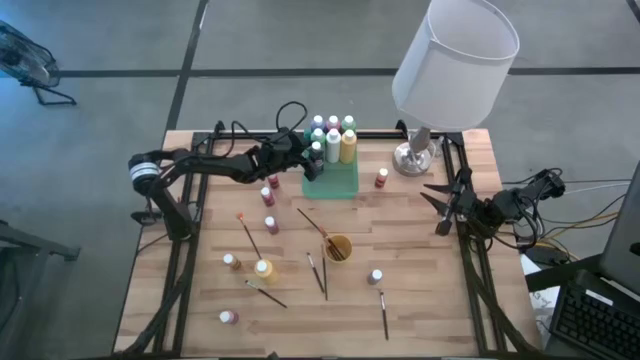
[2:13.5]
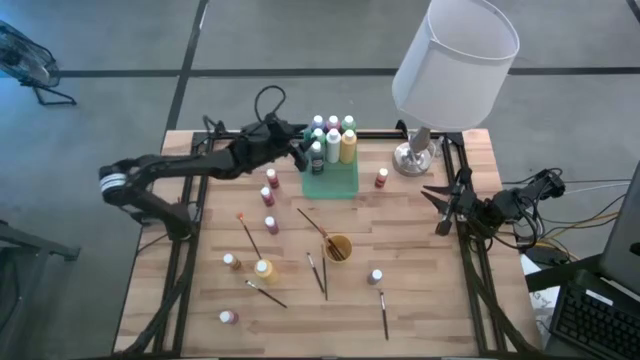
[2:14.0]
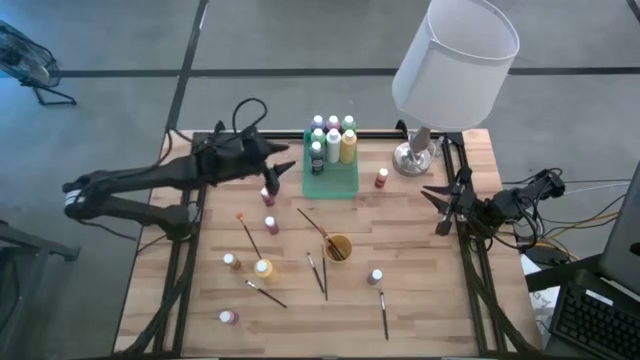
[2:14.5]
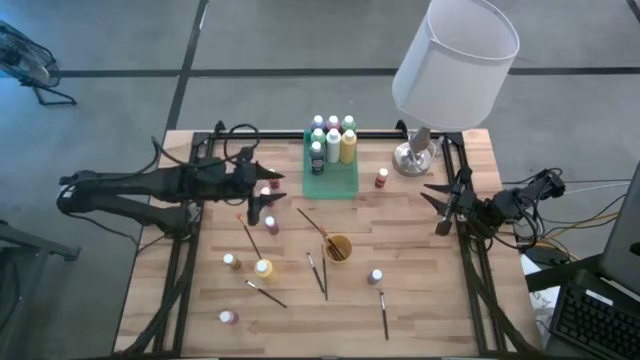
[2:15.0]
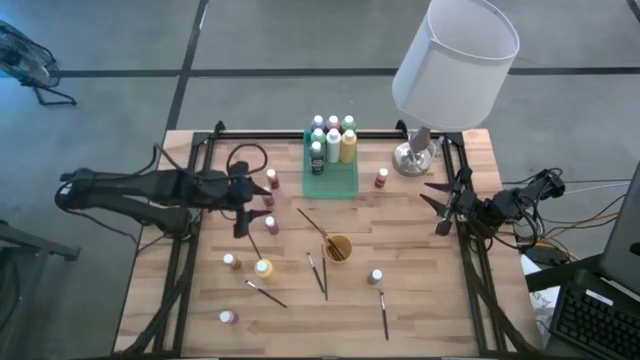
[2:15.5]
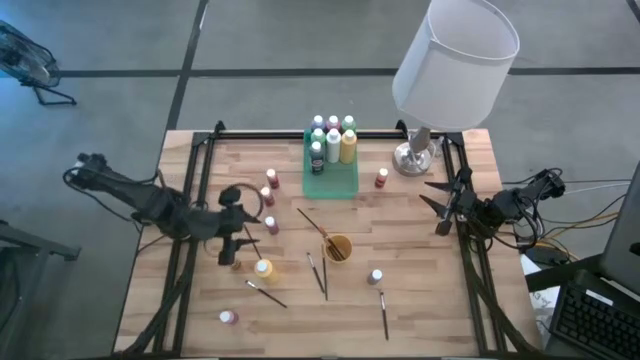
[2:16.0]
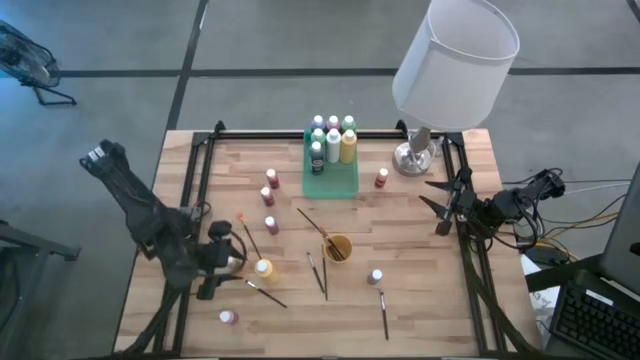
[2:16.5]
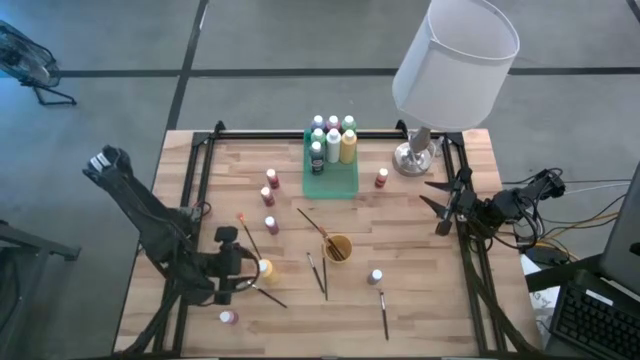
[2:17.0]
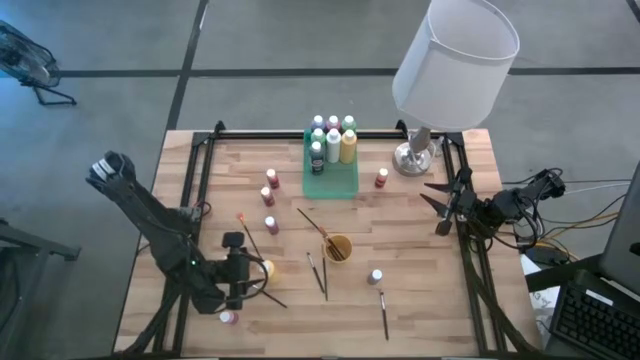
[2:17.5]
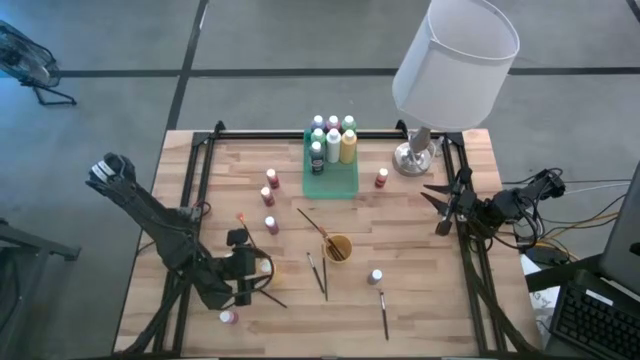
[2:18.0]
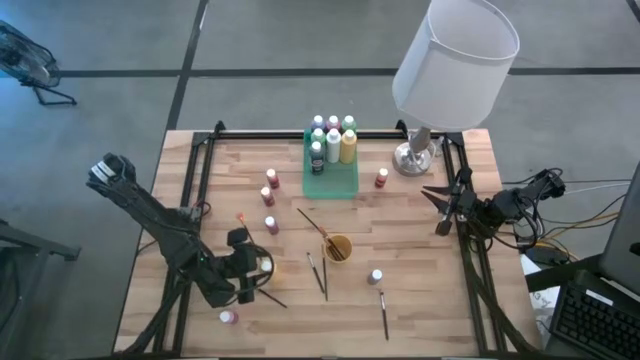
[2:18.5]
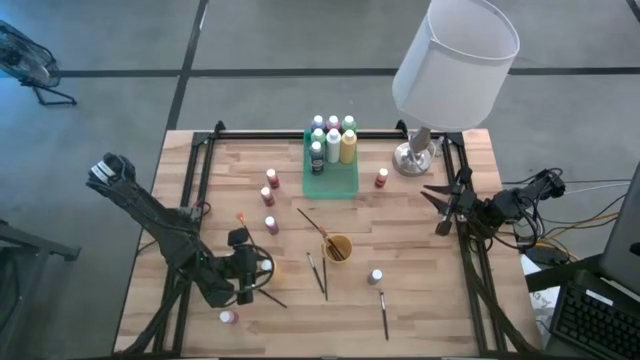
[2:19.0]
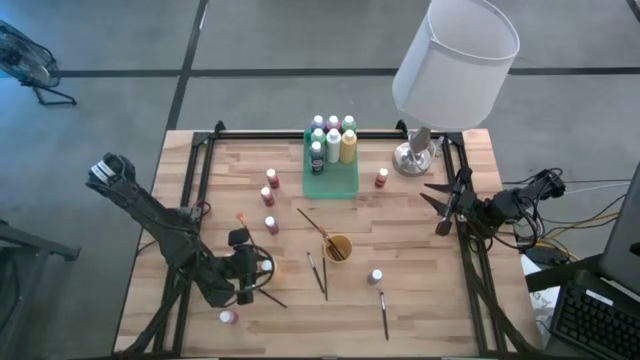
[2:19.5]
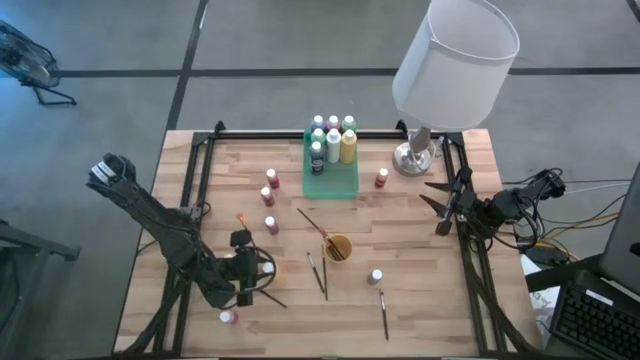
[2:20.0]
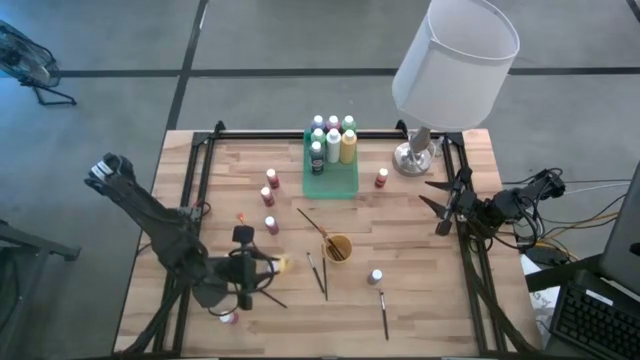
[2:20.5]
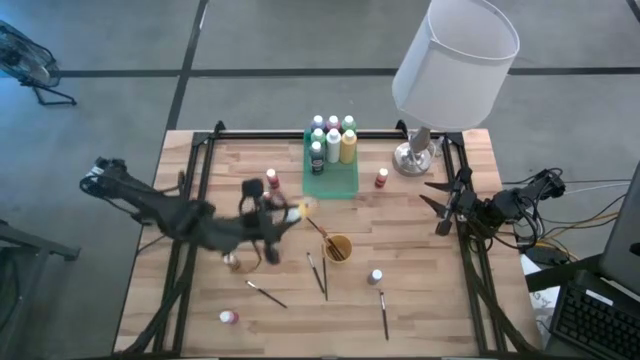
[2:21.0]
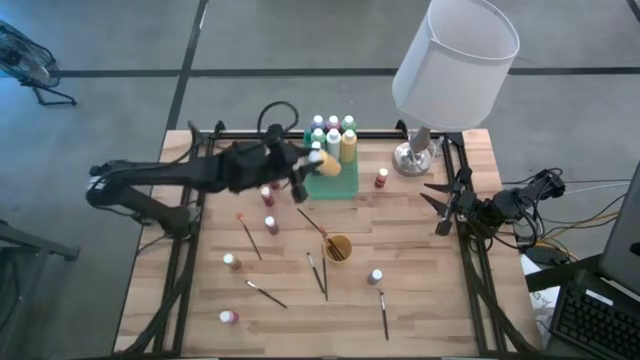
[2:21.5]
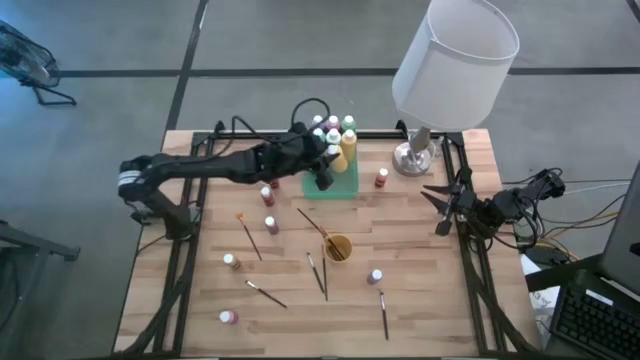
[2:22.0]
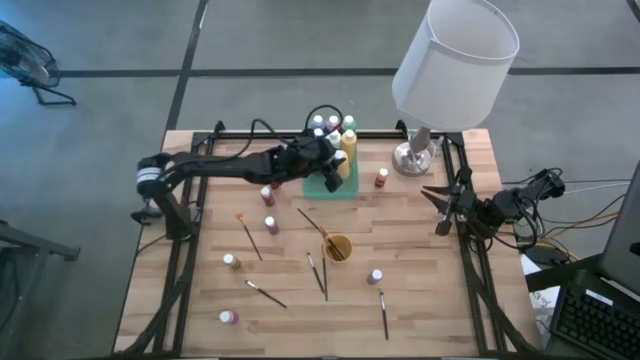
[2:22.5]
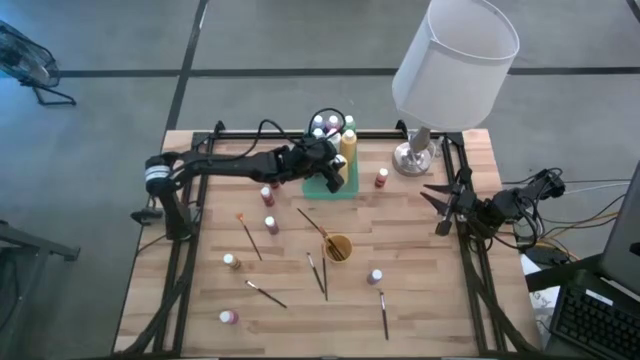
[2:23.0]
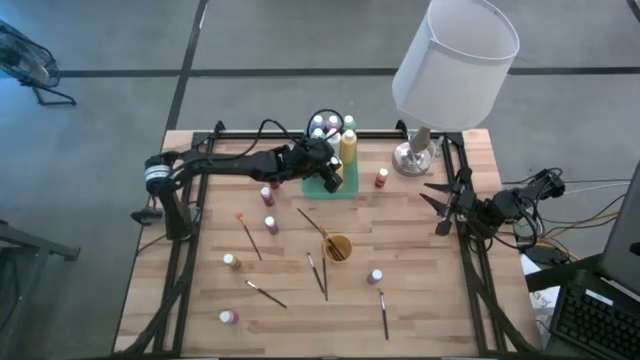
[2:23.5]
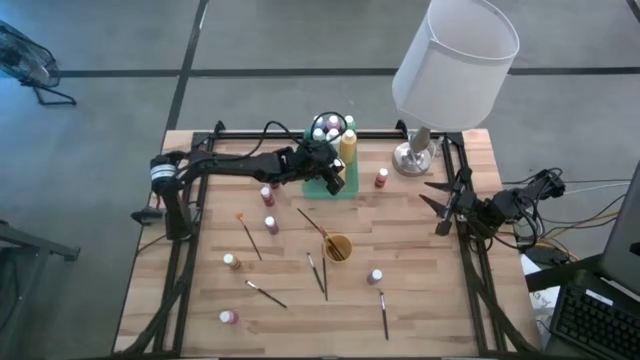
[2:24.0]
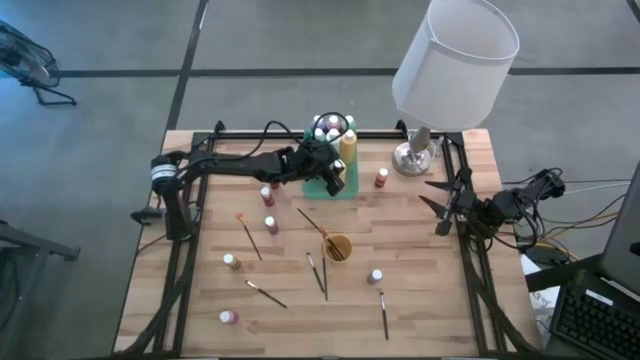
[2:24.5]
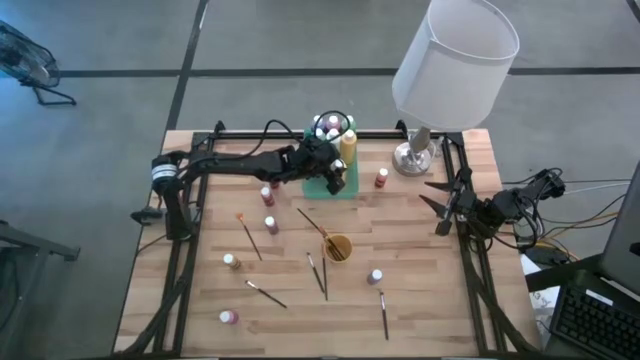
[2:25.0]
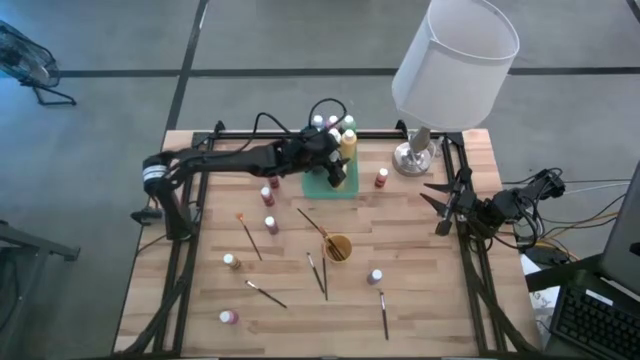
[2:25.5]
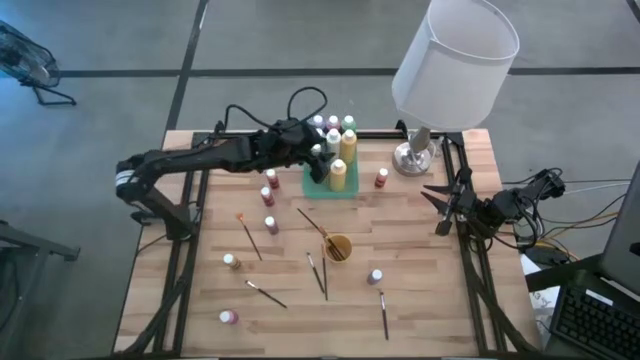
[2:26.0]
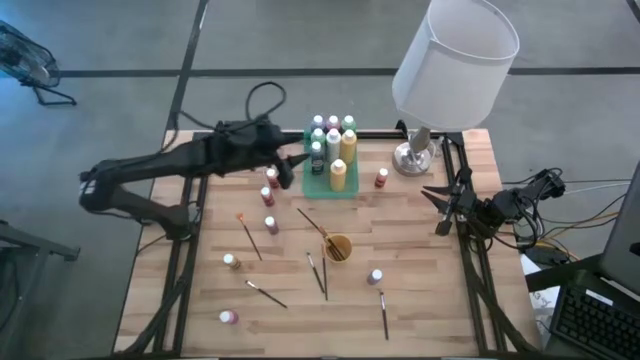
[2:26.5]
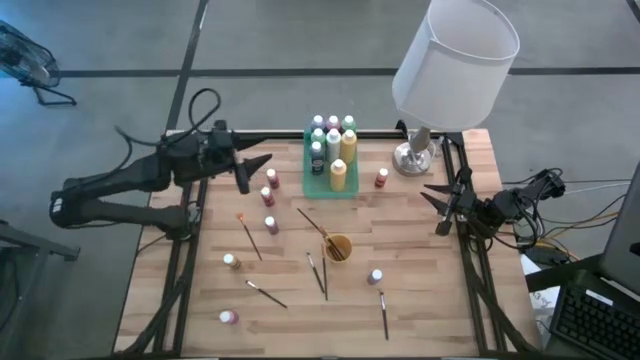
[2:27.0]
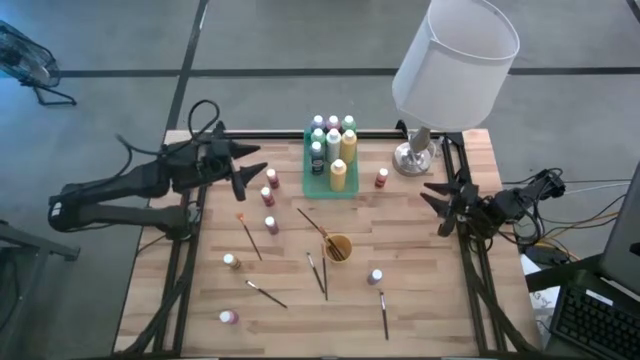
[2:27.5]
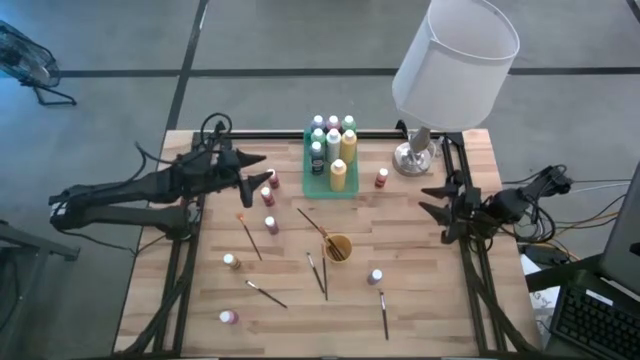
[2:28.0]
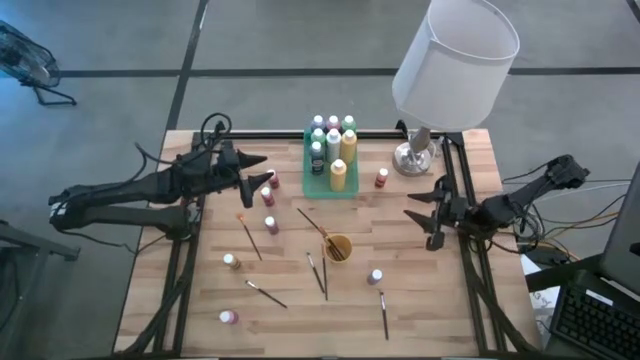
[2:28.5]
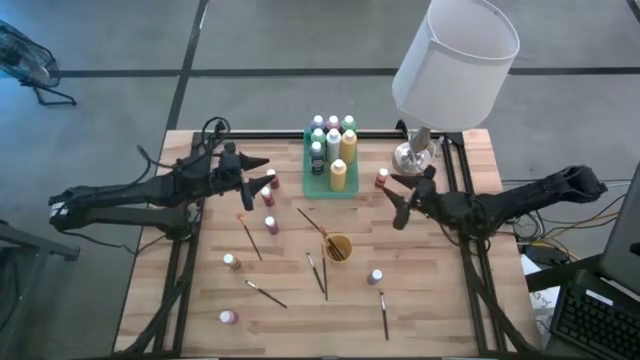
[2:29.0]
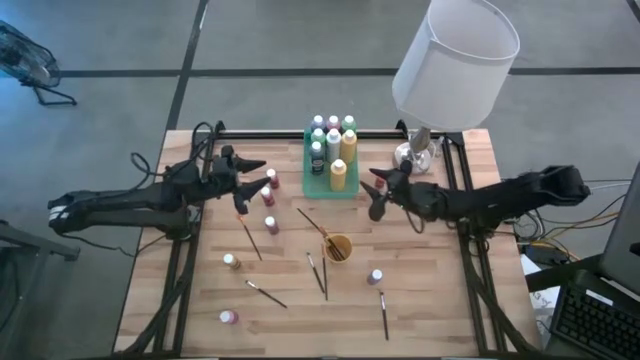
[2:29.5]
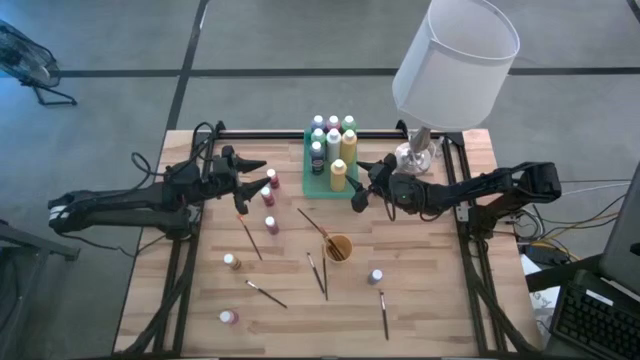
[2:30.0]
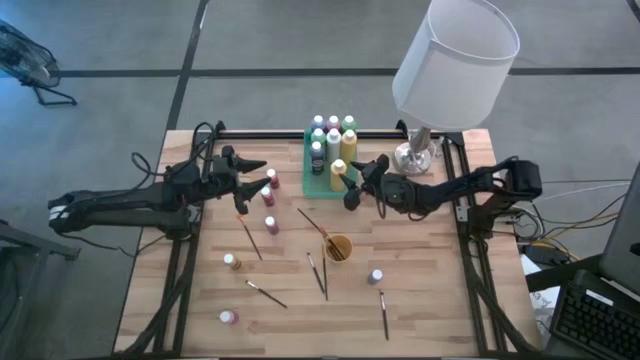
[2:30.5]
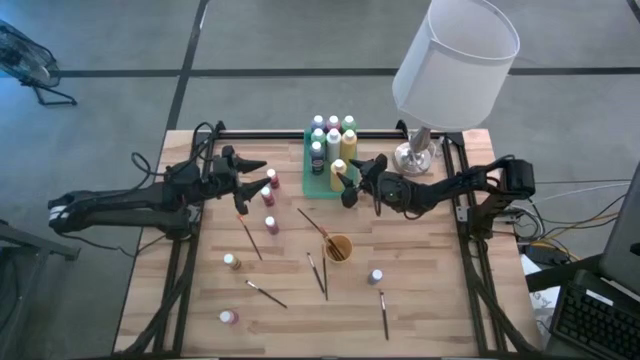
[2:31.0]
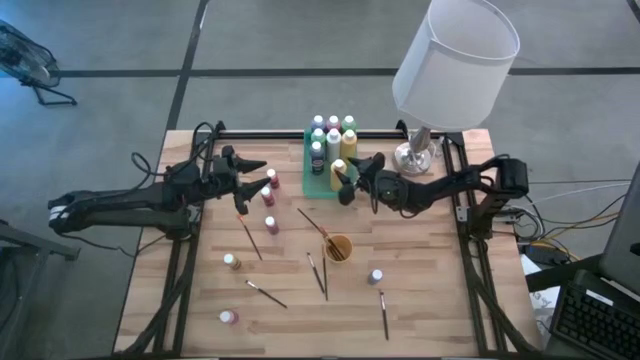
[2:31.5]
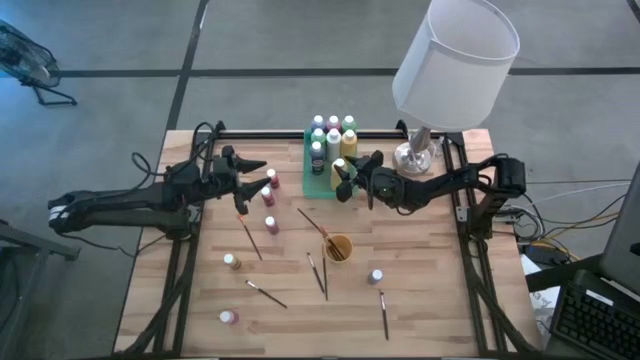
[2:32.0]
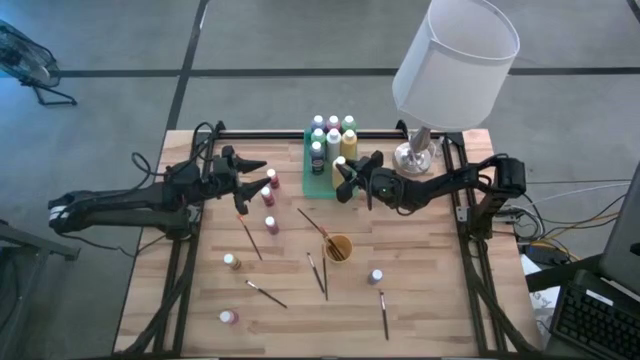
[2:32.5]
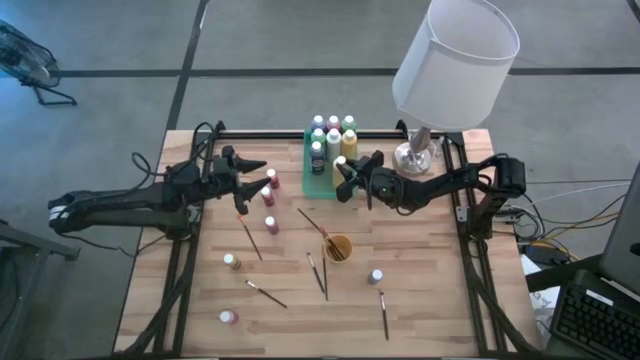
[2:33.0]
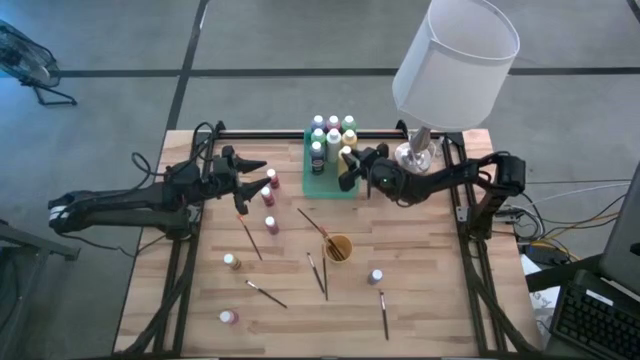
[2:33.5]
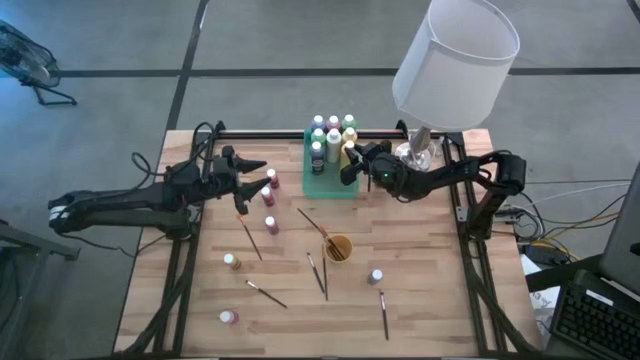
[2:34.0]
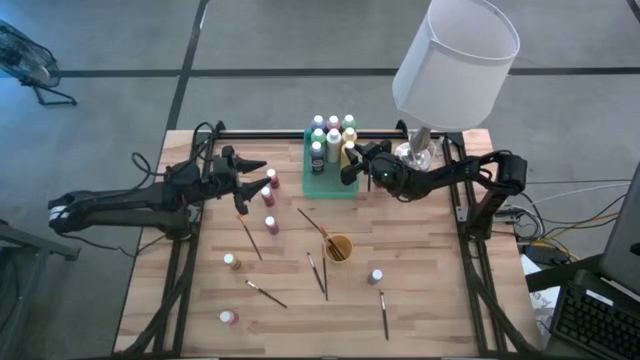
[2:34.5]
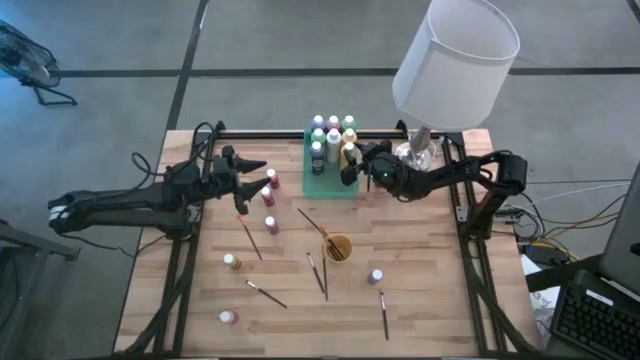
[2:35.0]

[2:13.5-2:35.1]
Task: Pick & Place Paint Supplies
Put the yellow paint bottle into the green bin
